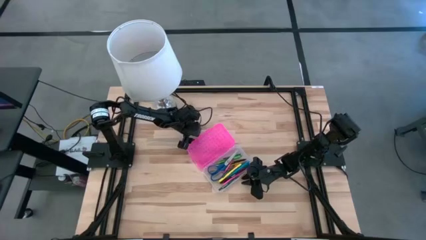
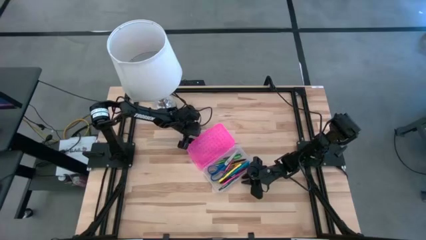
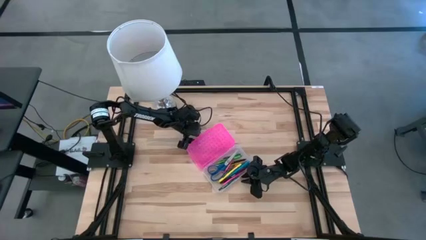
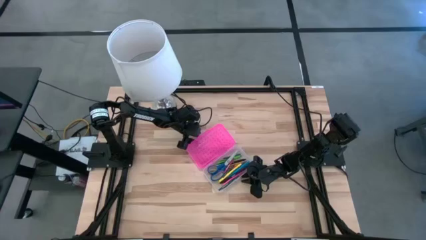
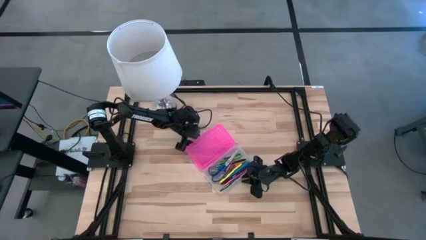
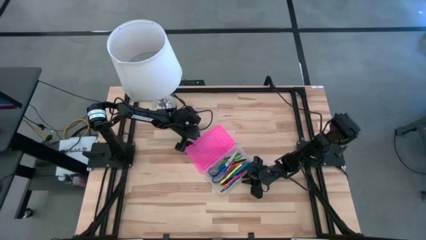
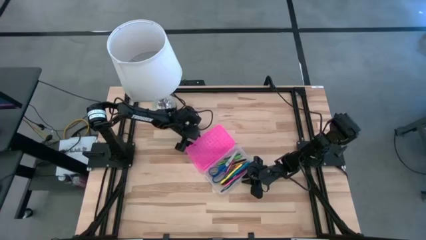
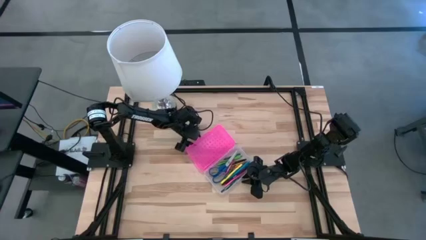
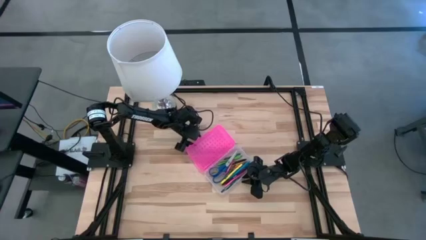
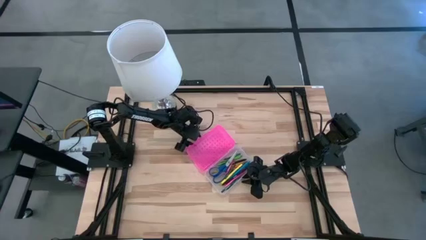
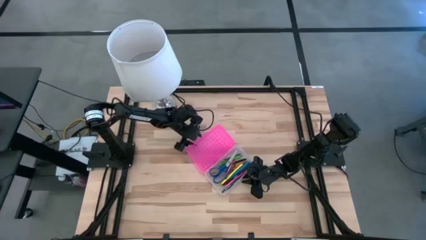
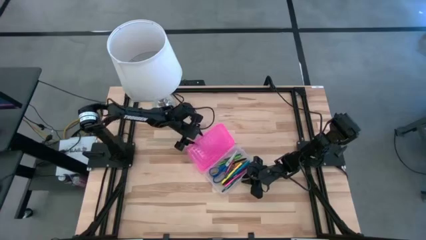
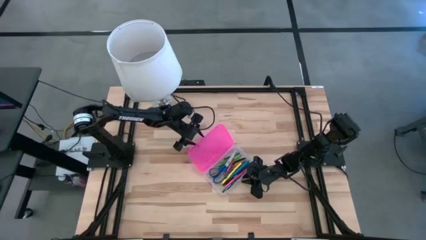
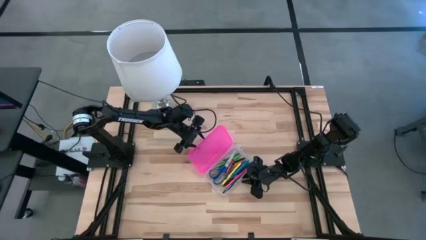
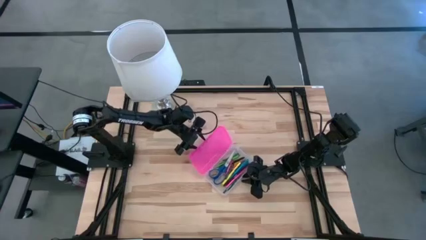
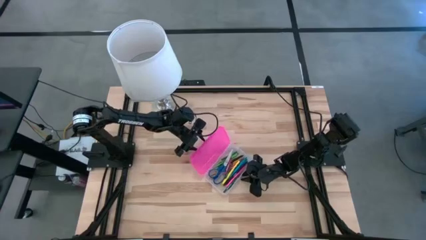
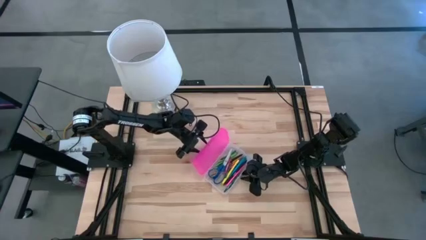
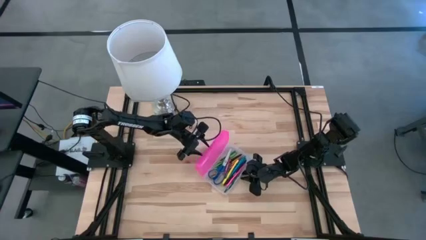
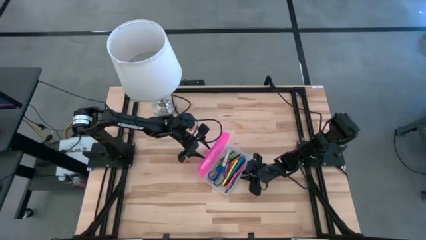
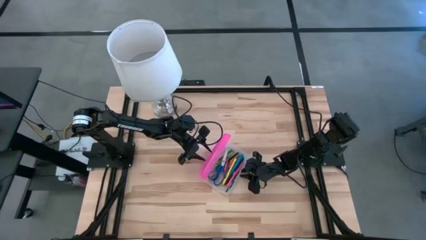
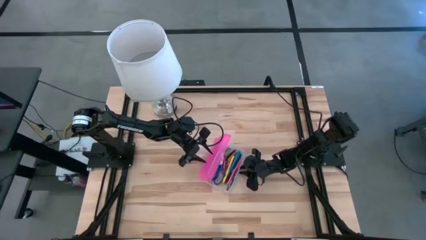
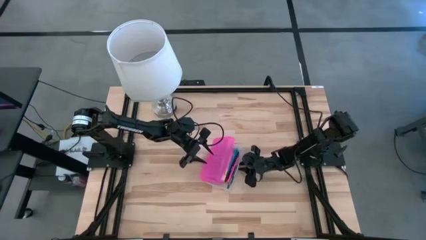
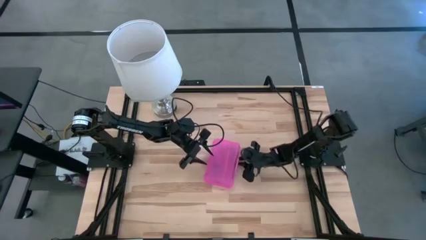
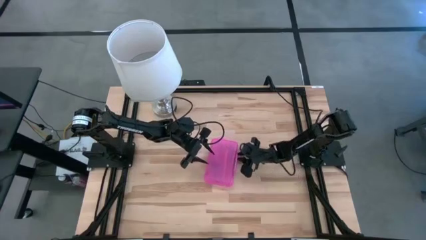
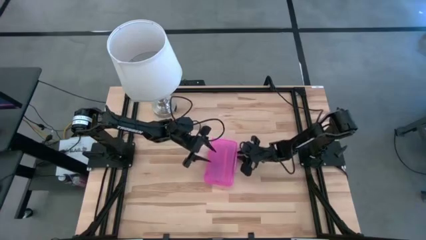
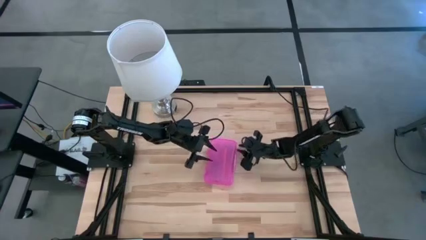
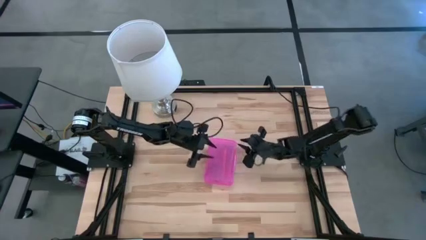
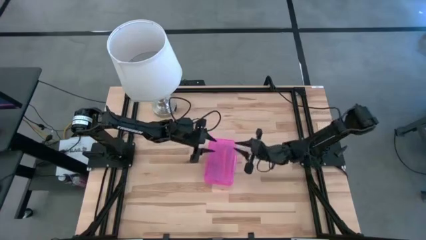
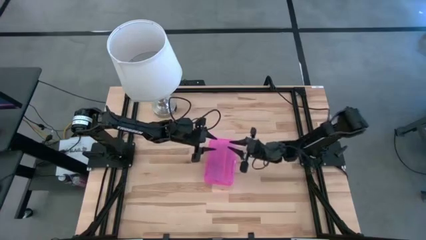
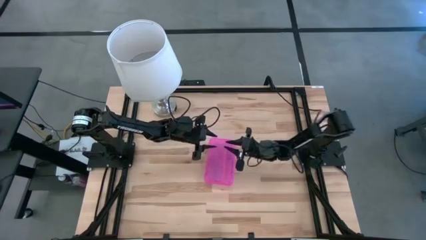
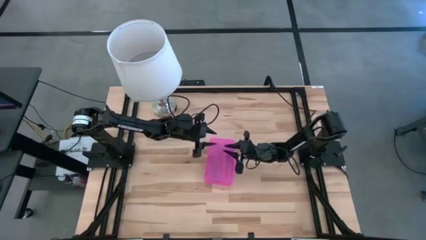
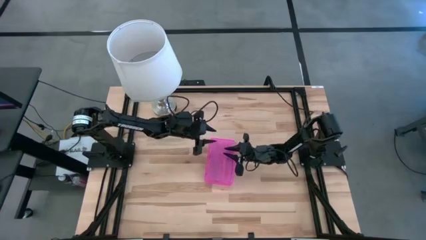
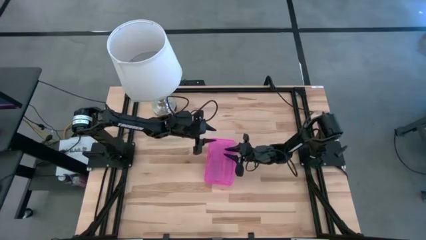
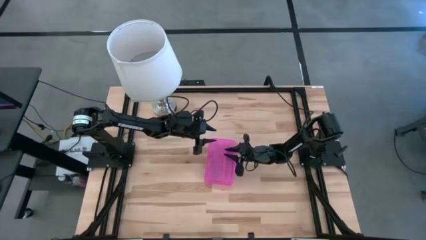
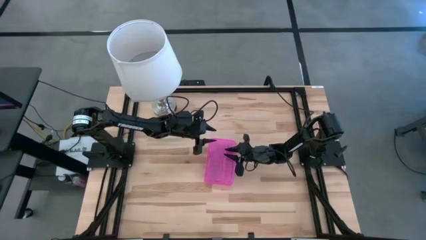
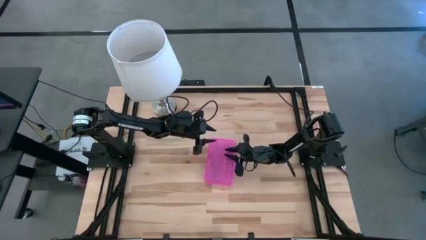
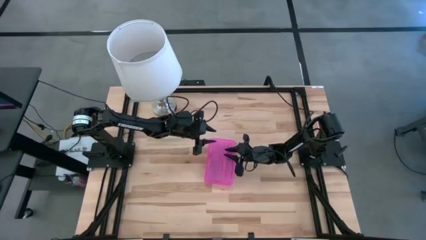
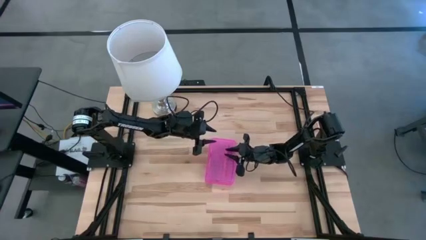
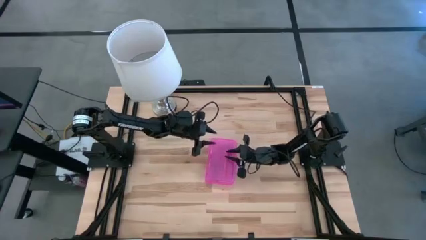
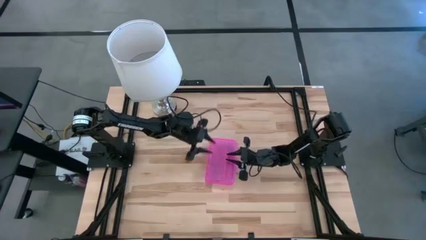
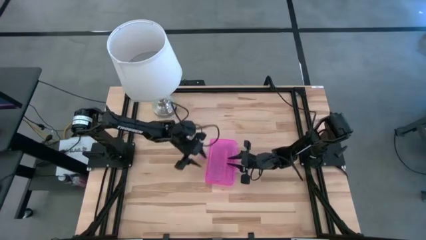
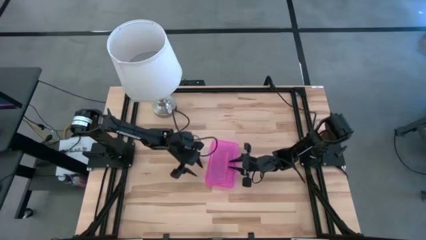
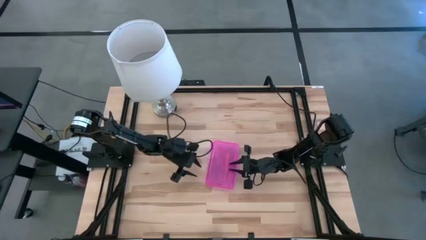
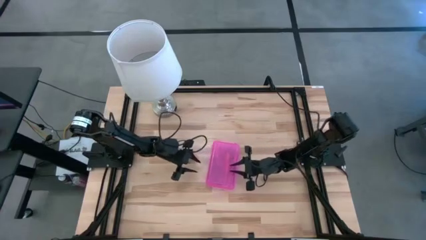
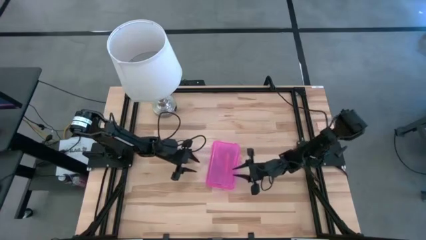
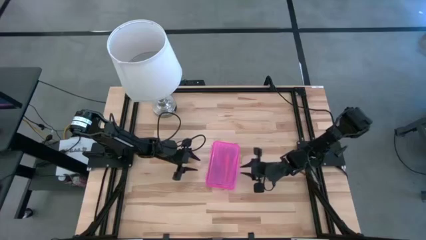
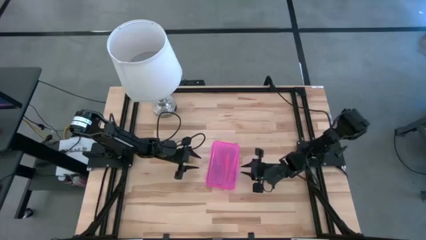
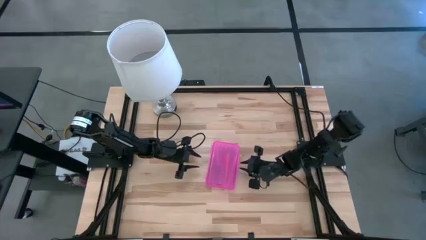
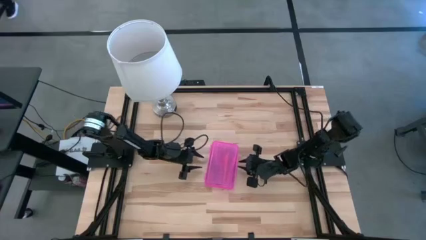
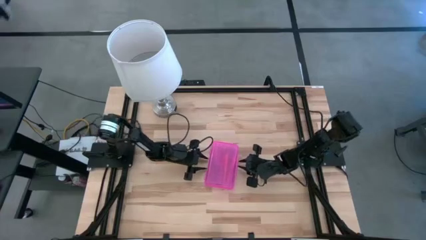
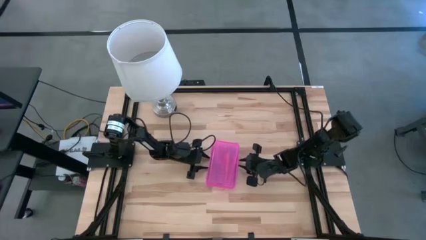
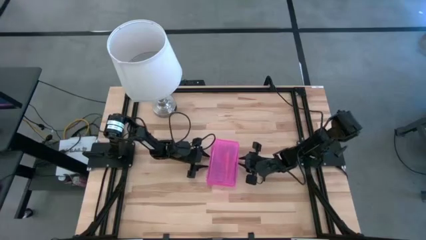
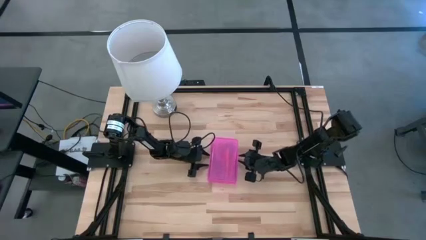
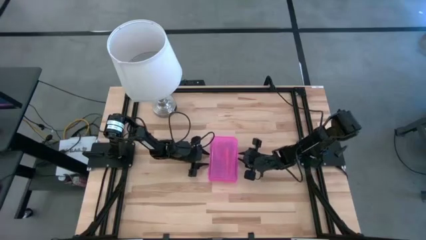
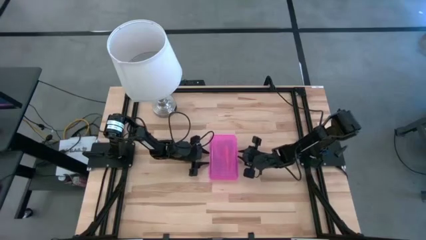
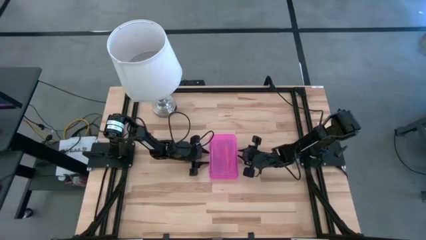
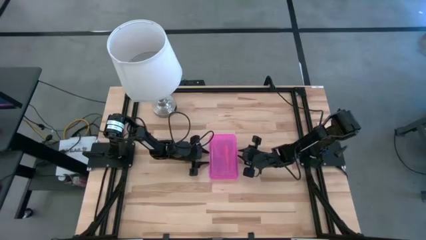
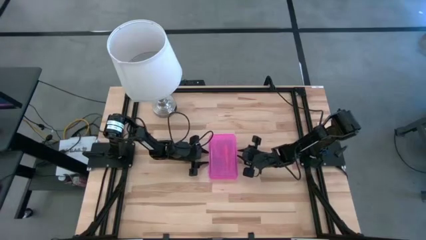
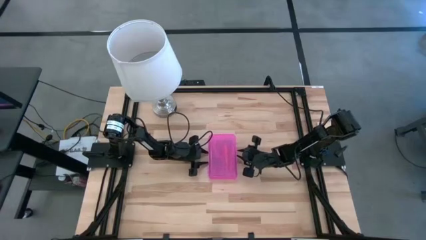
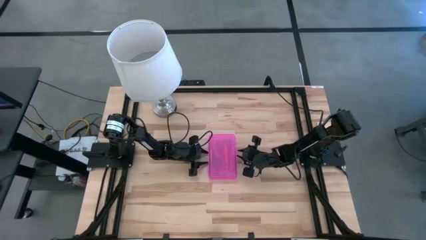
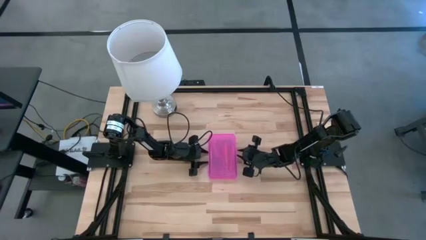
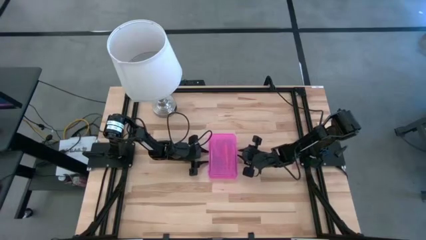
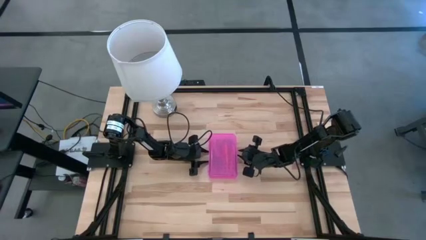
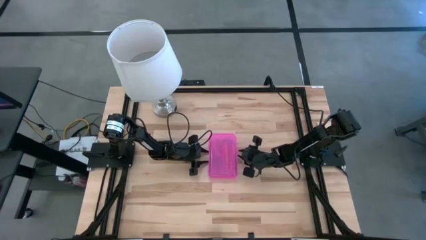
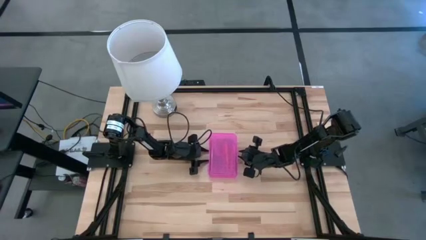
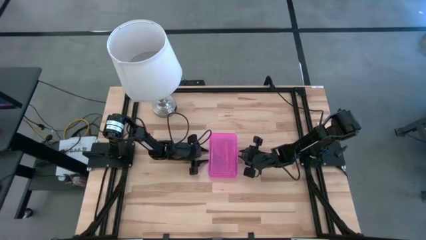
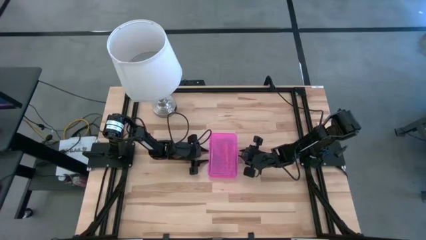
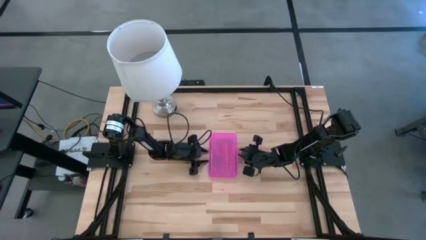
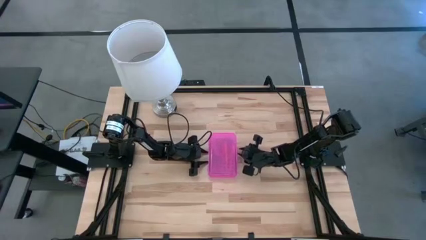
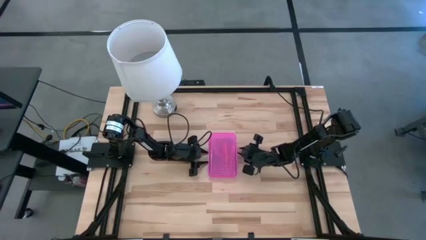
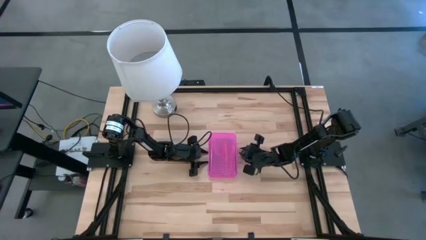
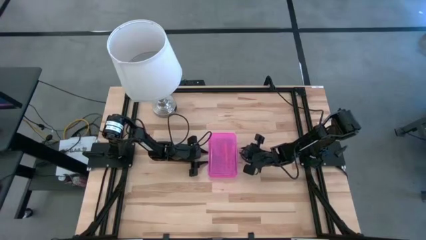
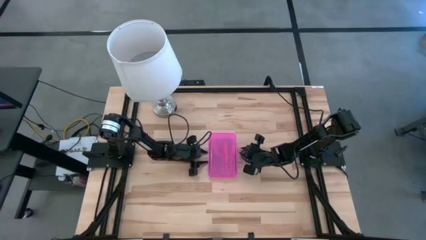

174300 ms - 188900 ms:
Task: Pick & place school supplies into a supply box
Close the pink supply box

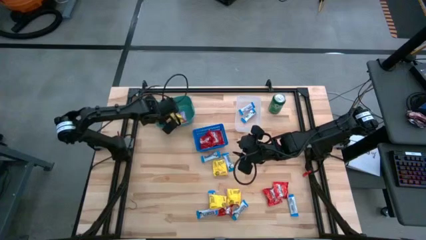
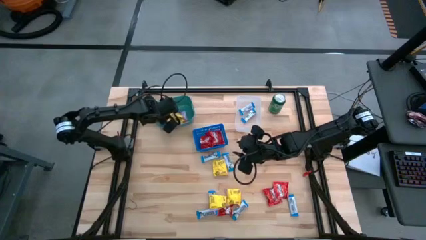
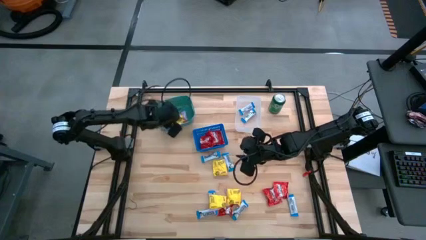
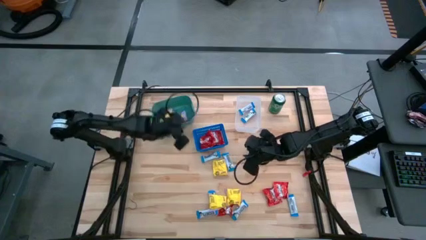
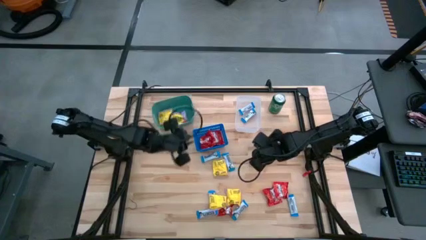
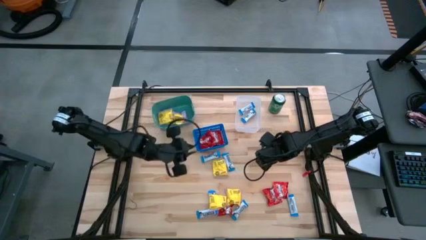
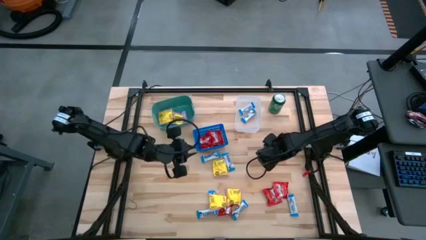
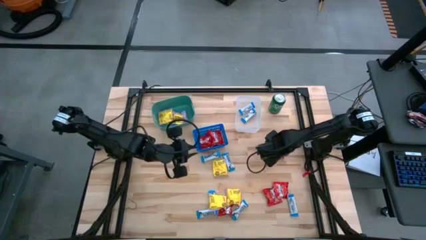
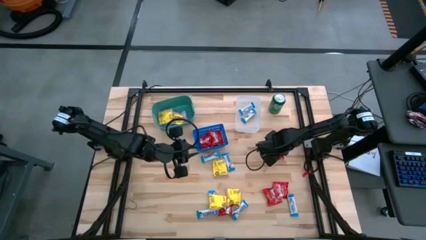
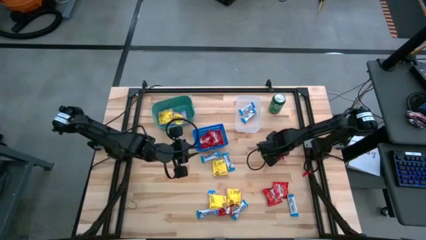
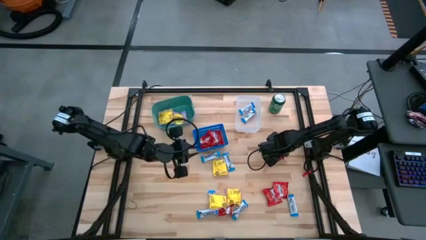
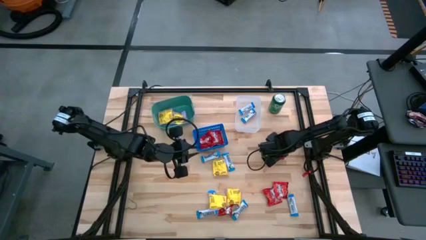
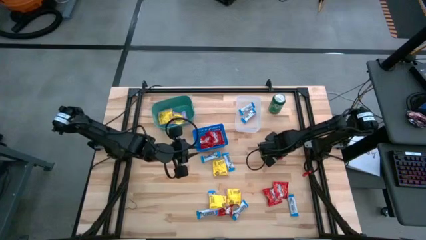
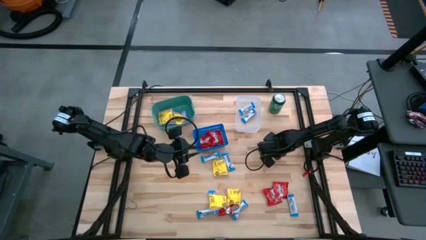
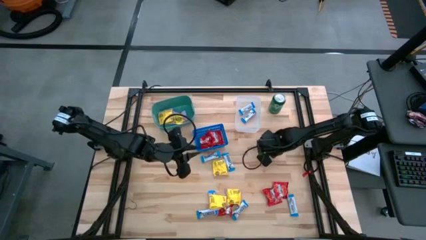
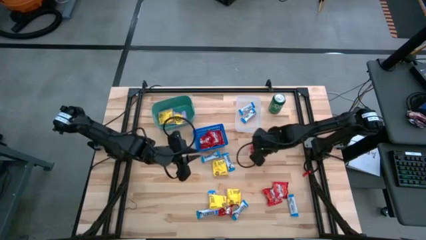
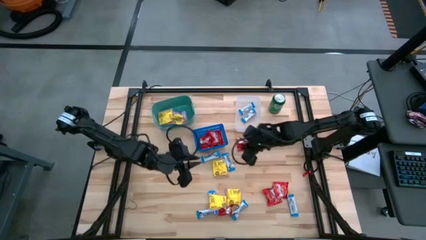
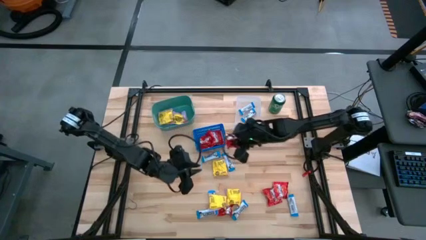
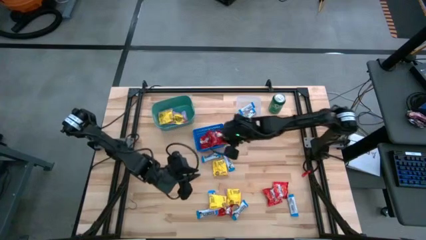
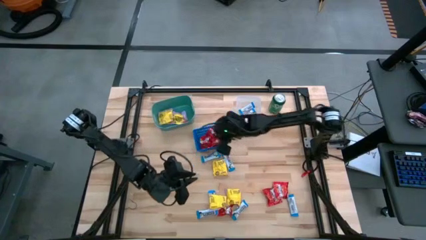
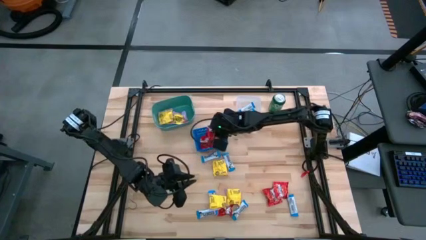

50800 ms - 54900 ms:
Task: Sort candy
Put the skittles candy into the blue basket
